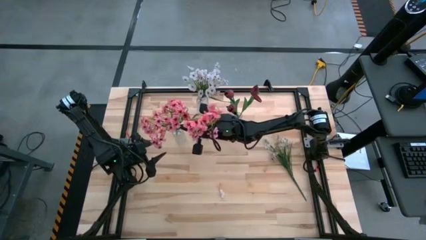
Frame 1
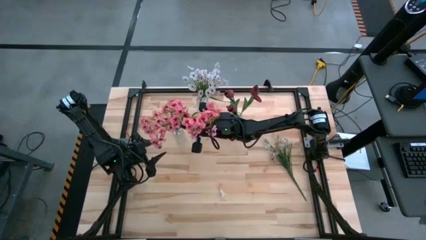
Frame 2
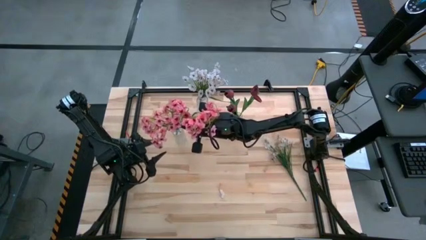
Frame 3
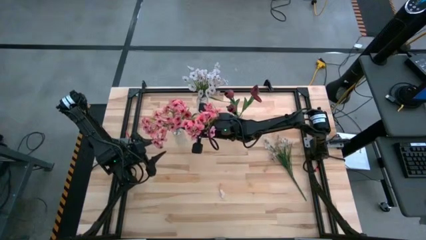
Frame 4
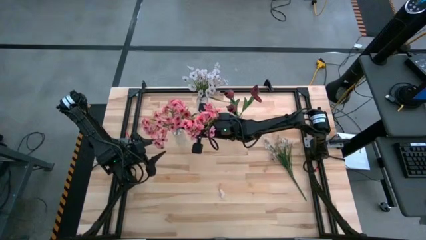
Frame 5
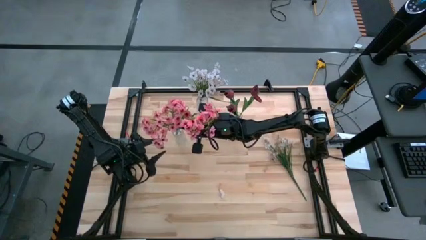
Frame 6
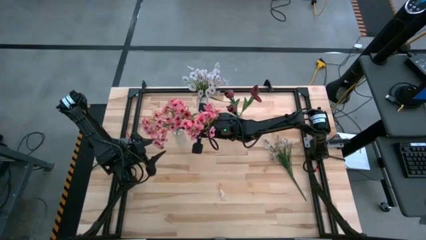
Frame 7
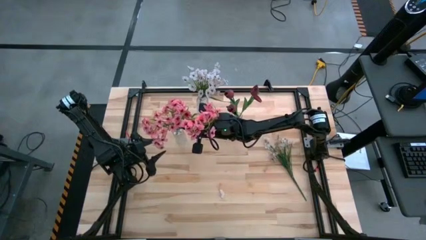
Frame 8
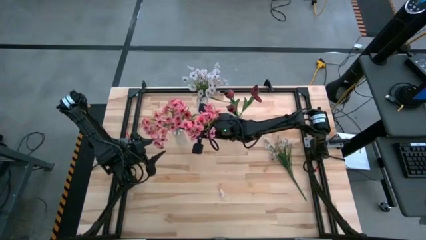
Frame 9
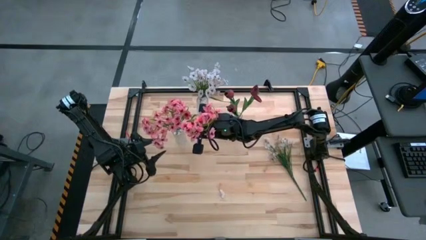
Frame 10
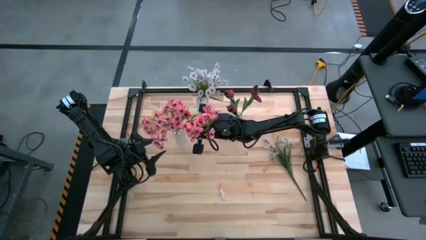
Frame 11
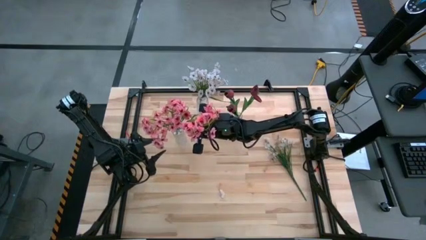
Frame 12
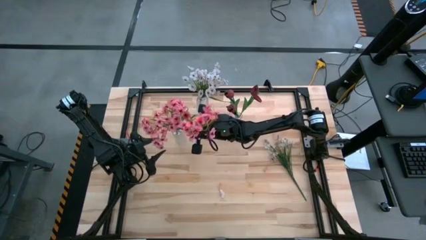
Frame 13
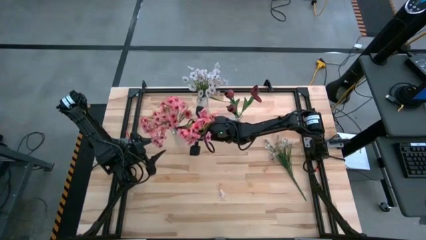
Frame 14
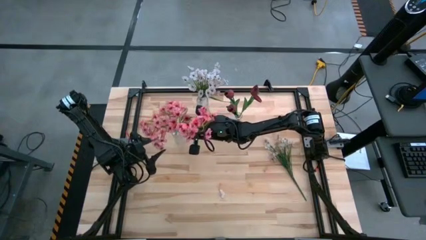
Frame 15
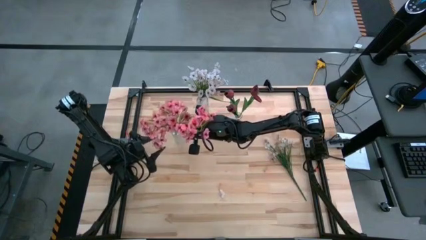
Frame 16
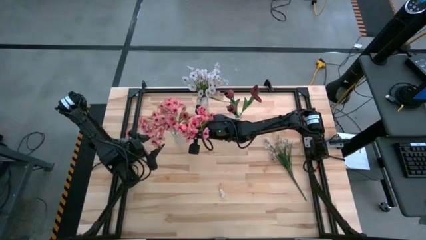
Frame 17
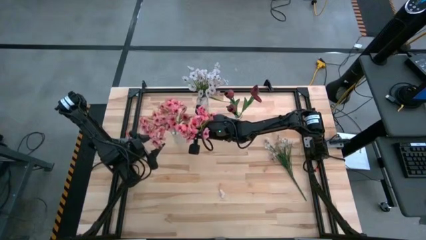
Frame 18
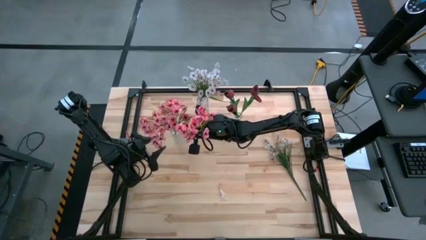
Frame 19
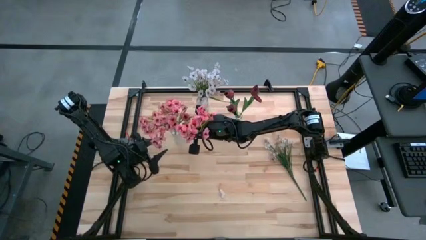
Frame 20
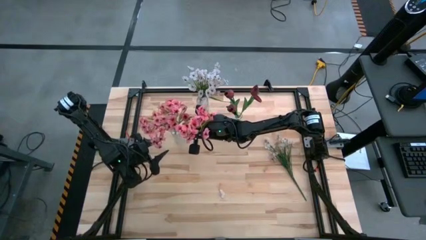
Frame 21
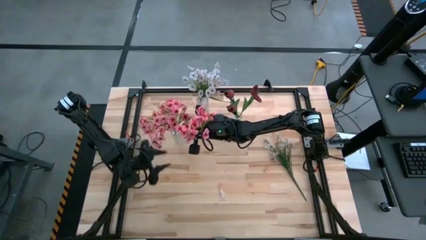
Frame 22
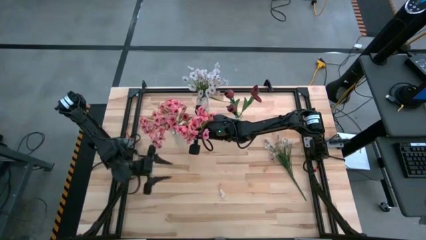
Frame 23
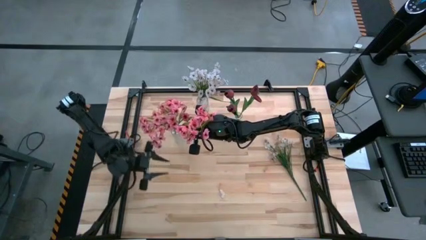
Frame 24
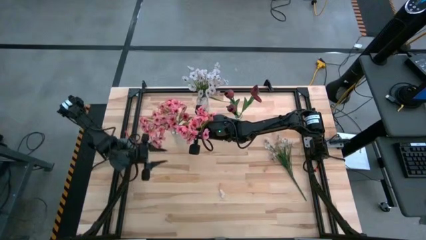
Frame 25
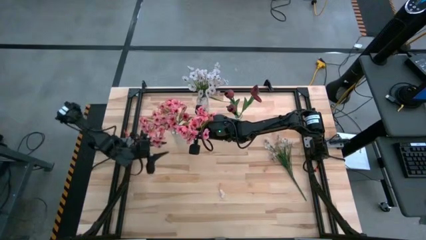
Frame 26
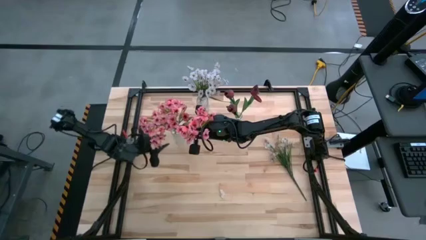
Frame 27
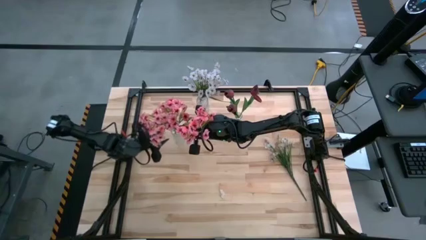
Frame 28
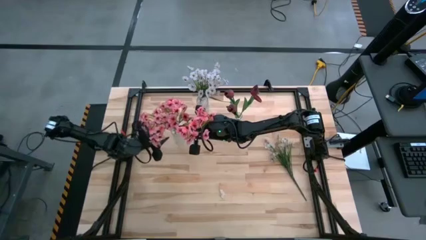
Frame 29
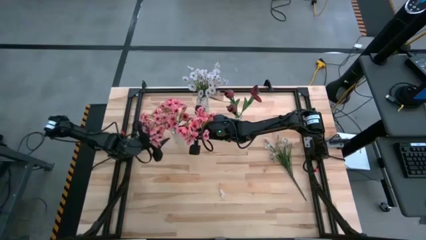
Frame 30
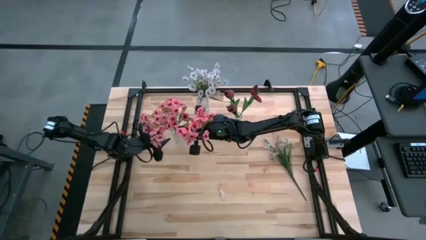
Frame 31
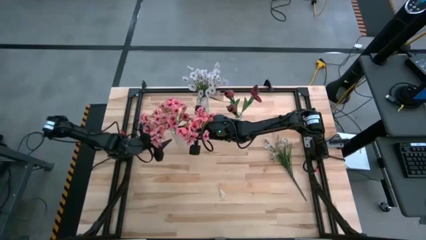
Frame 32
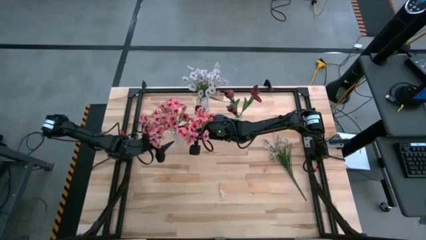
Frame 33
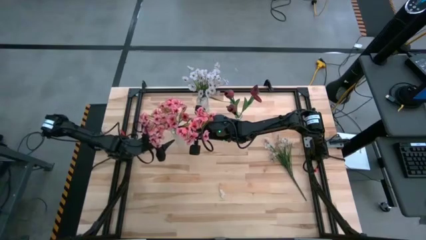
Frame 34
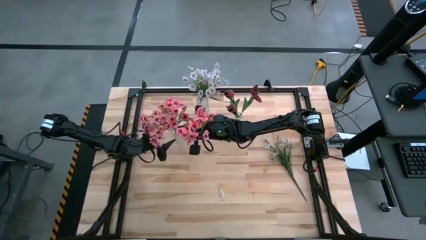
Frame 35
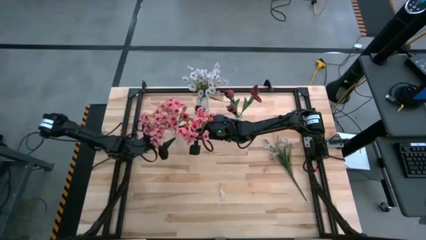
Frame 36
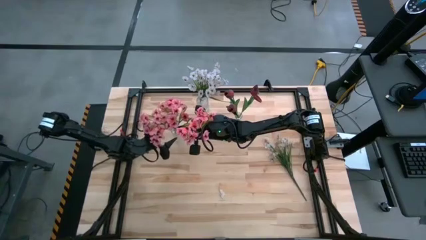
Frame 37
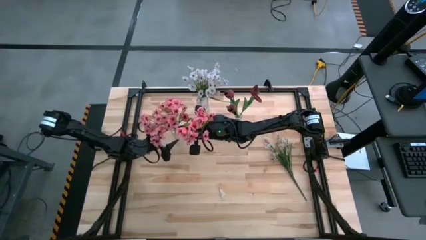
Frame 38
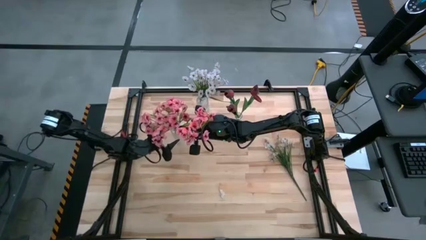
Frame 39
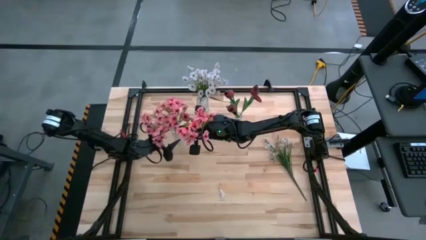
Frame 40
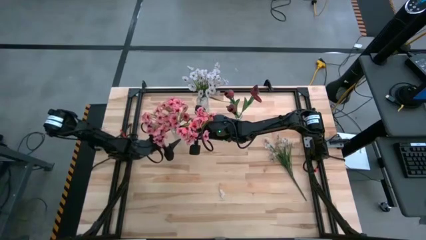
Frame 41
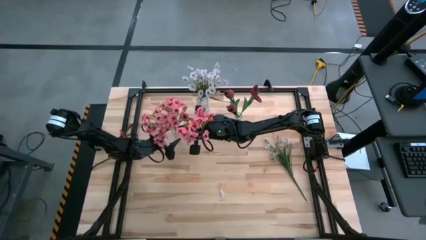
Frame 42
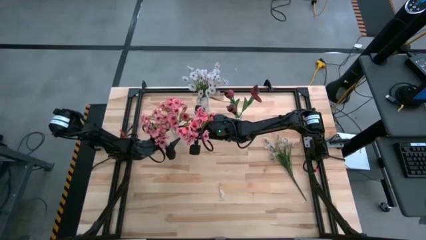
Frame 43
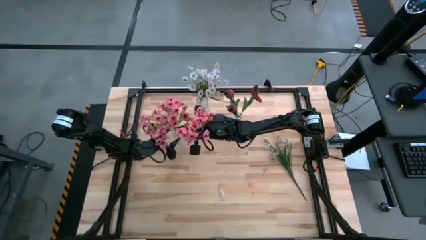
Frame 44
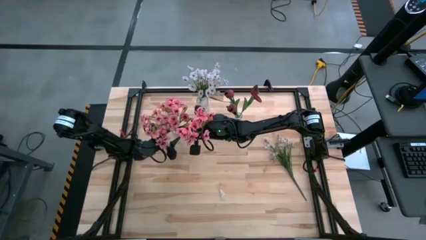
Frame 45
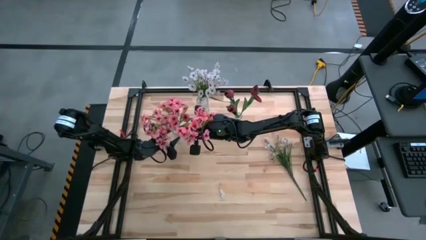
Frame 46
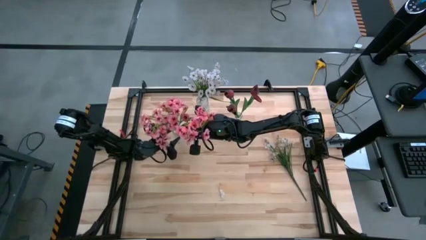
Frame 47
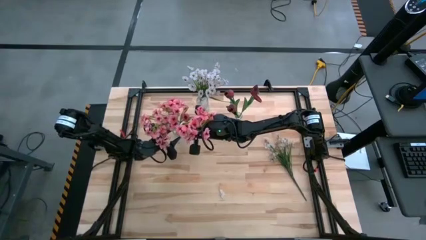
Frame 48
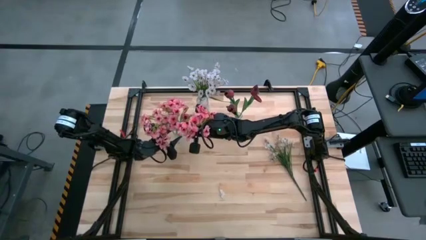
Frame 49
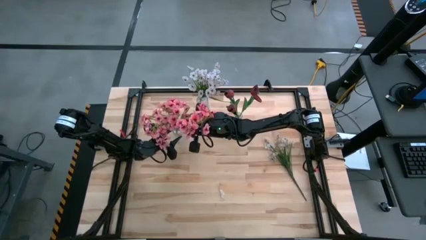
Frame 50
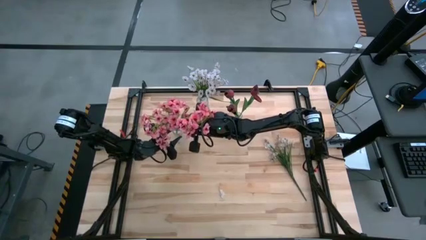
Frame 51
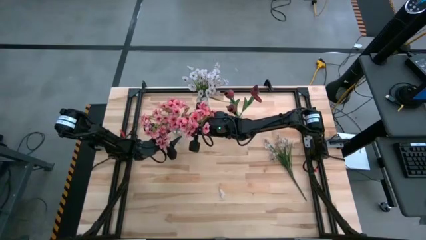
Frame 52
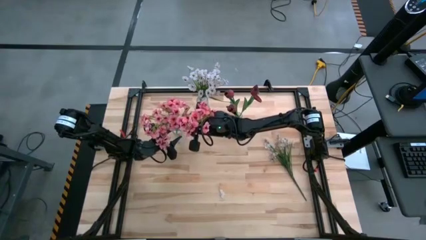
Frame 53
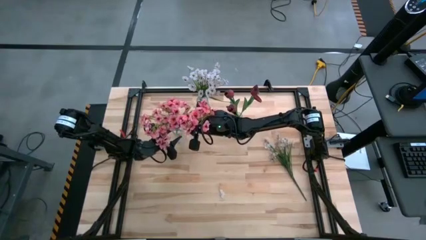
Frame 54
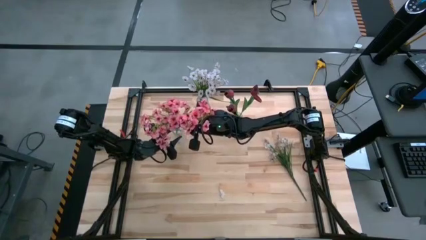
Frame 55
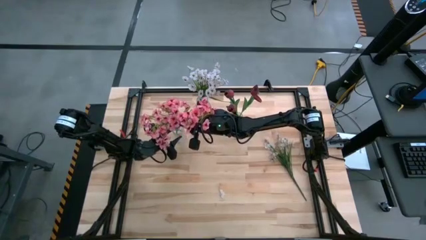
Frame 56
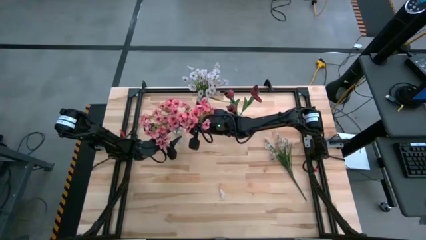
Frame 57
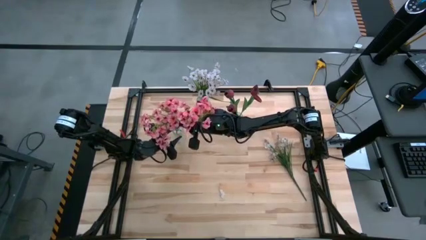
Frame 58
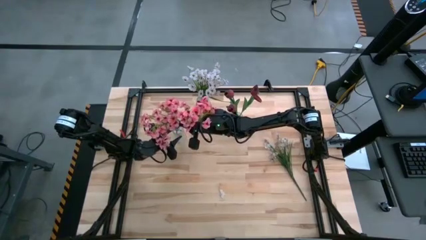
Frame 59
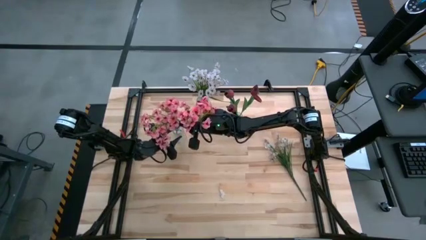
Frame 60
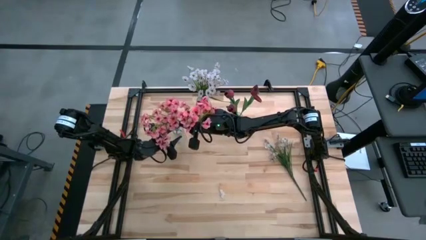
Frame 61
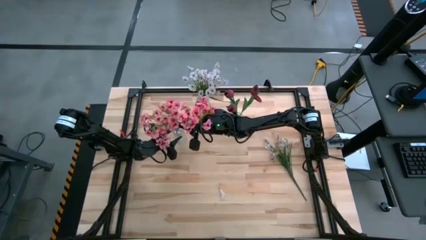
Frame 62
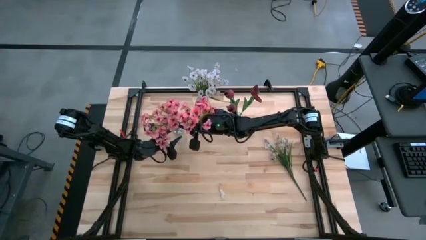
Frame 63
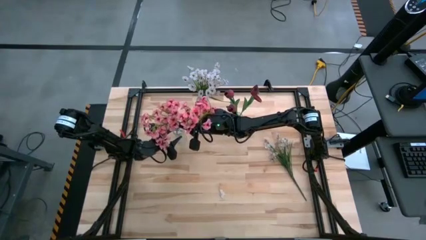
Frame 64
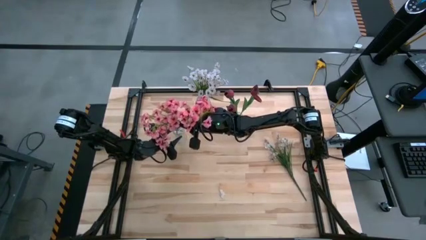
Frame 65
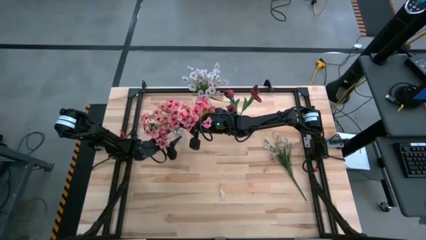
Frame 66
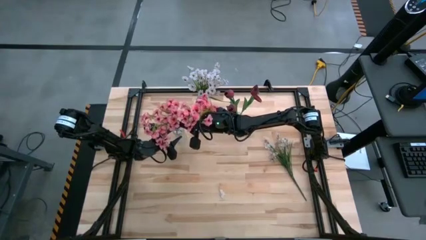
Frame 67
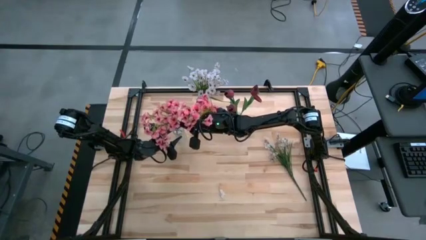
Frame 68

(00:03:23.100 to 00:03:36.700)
Task: Sort flowers into vase by color
Put the pink flower into the bottom left transparent vase
